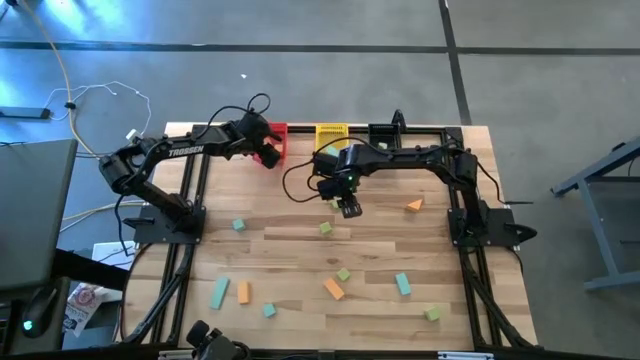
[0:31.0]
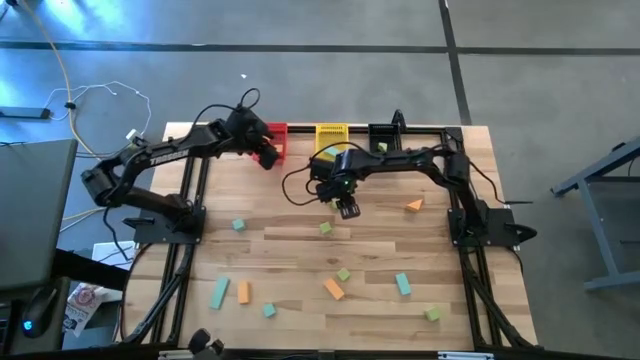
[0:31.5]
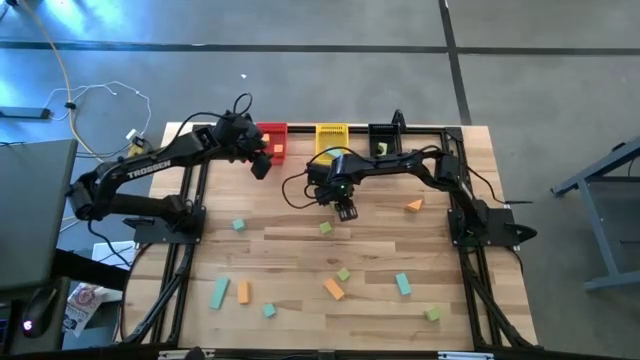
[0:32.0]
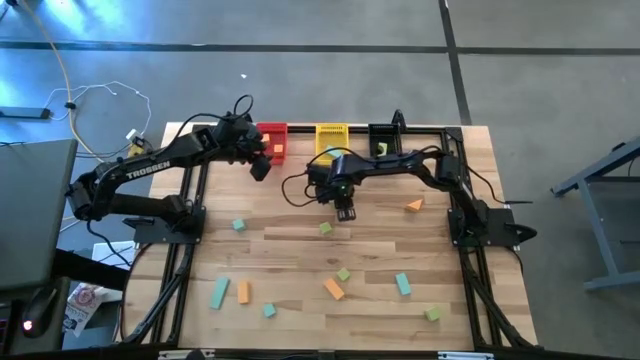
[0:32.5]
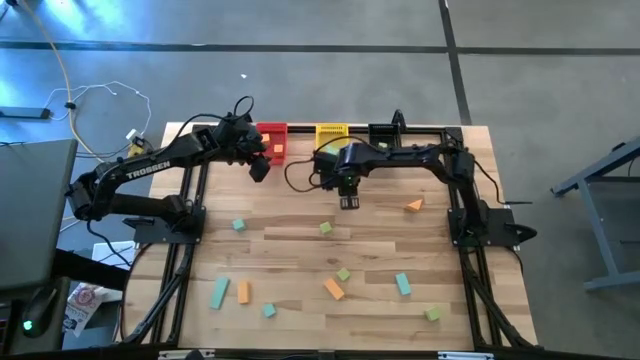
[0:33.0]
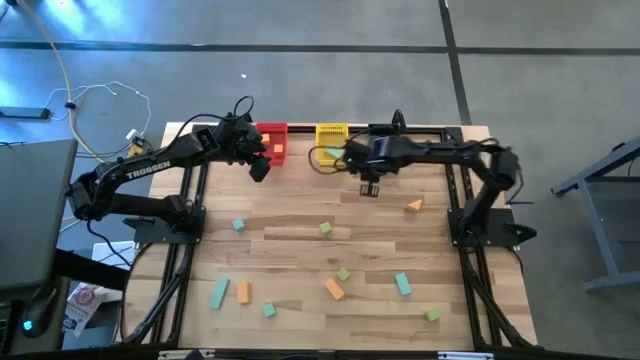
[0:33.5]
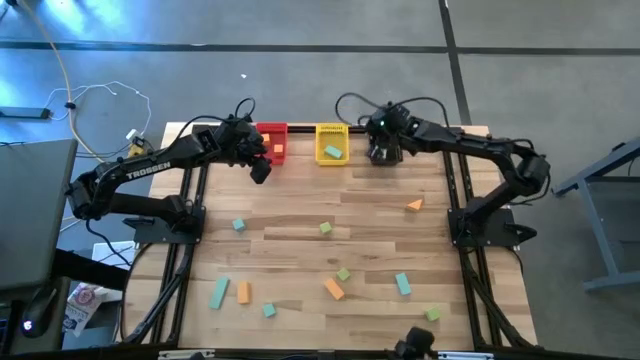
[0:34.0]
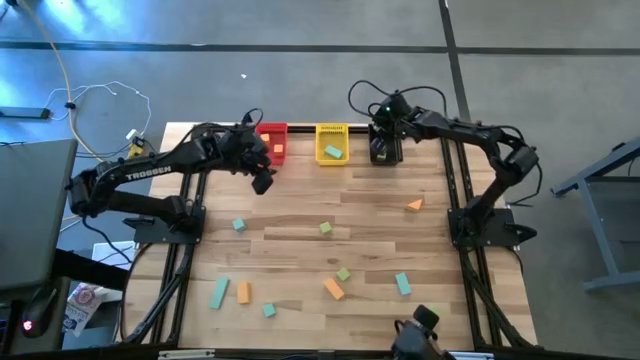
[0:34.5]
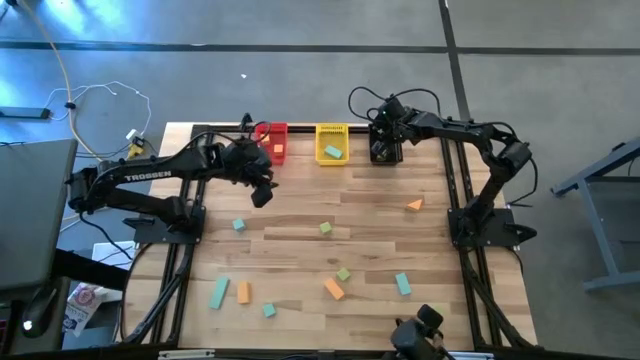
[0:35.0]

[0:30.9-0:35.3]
Task: Sort & place blocks by color
Put the green block into the black bin

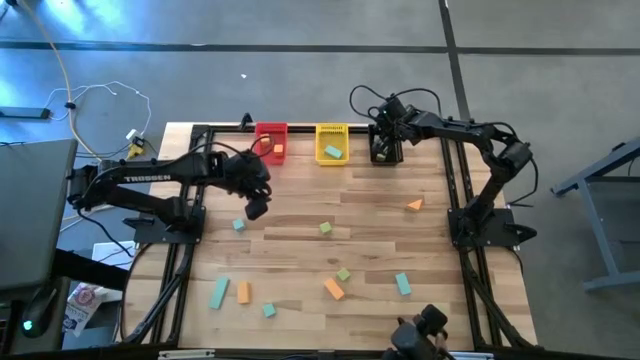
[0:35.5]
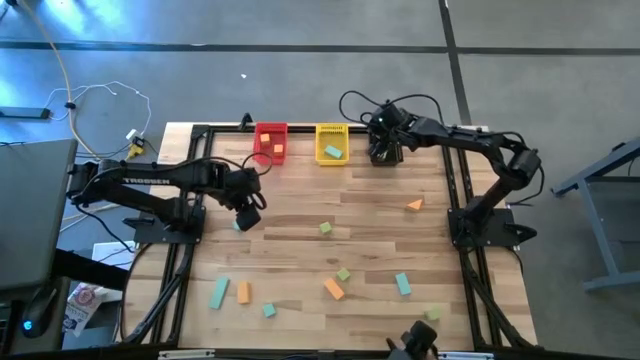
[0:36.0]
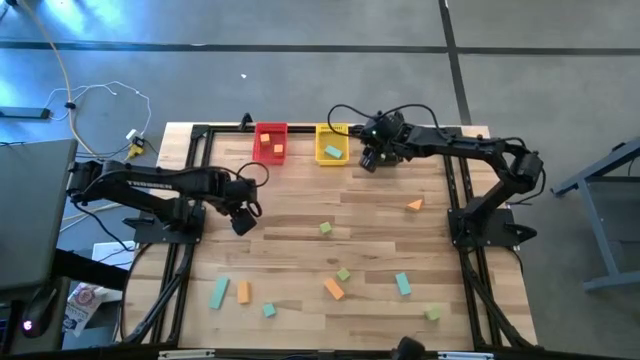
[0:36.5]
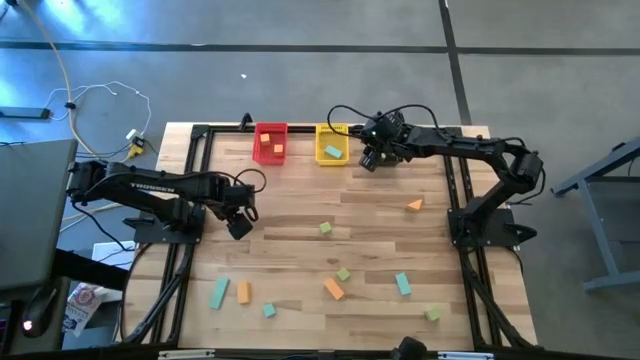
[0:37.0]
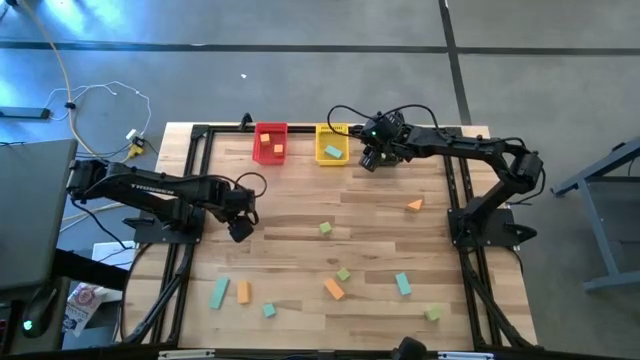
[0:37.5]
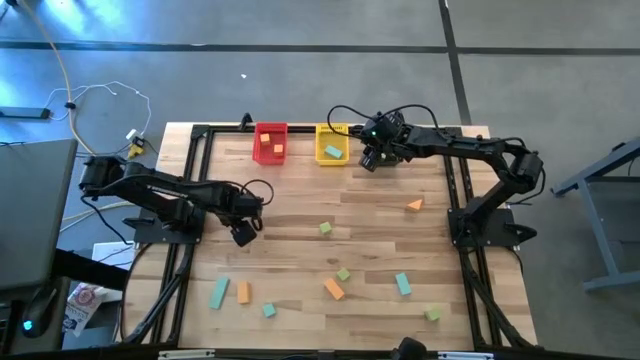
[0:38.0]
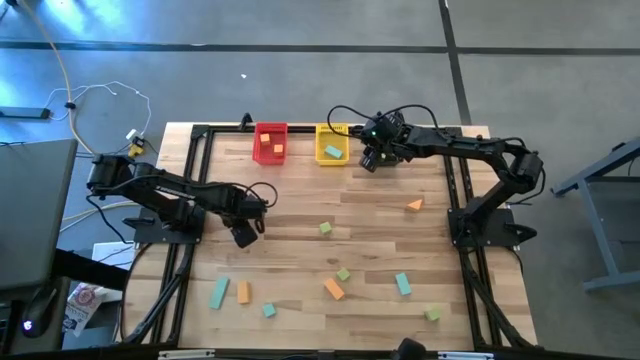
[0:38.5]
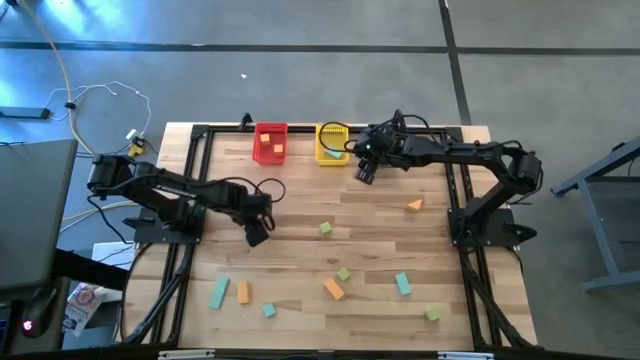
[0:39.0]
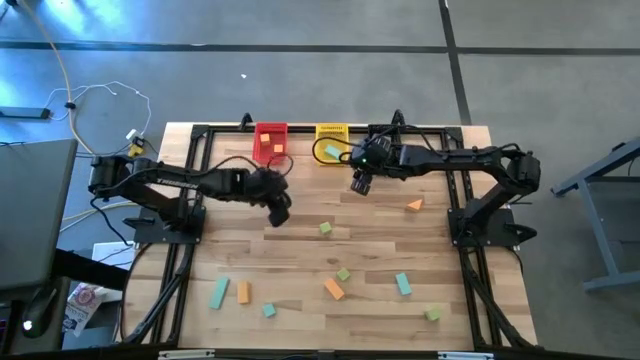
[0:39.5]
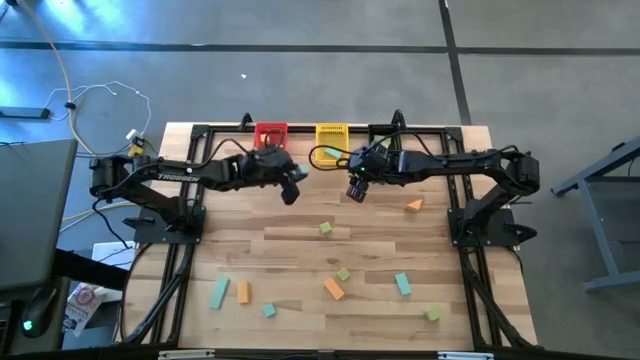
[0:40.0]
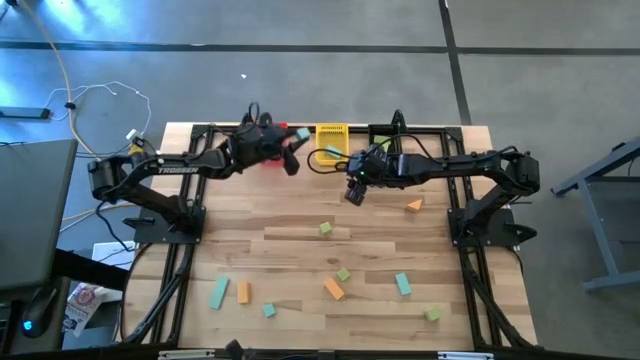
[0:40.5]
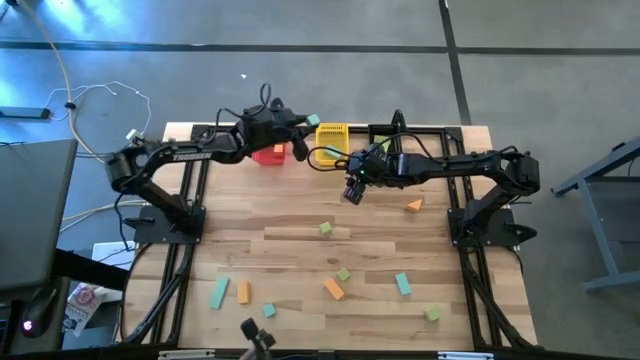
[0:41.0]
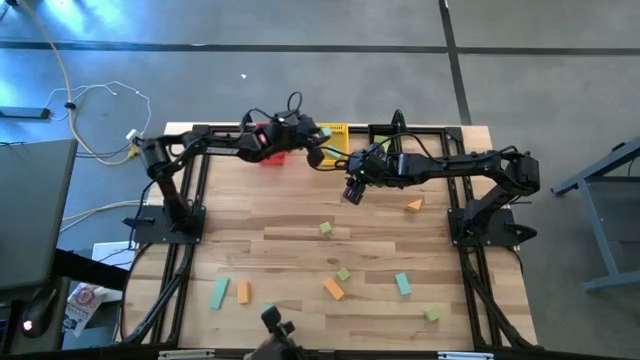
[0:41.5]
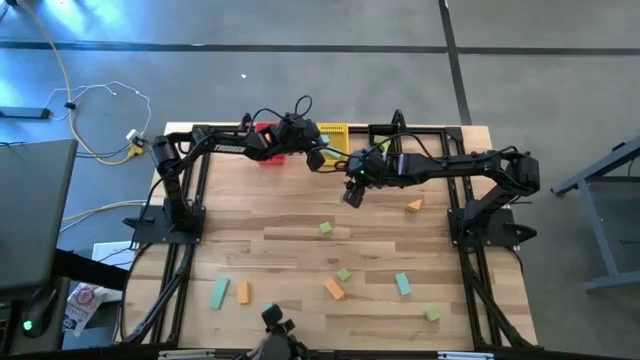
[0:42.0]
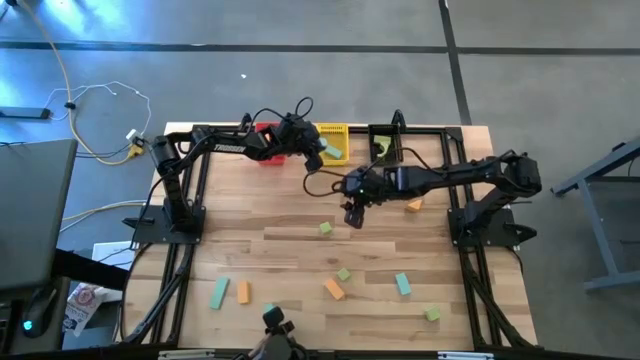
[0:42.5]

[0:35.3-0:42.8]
Put the blue block into the yellow bin

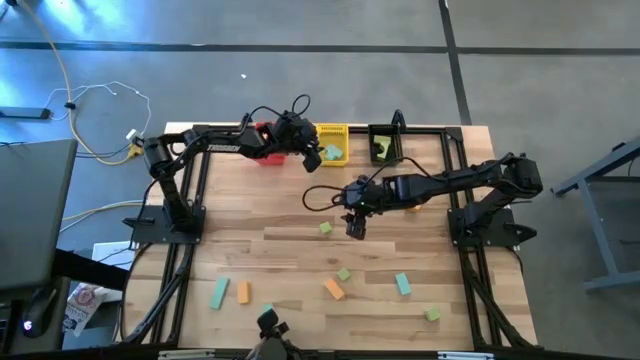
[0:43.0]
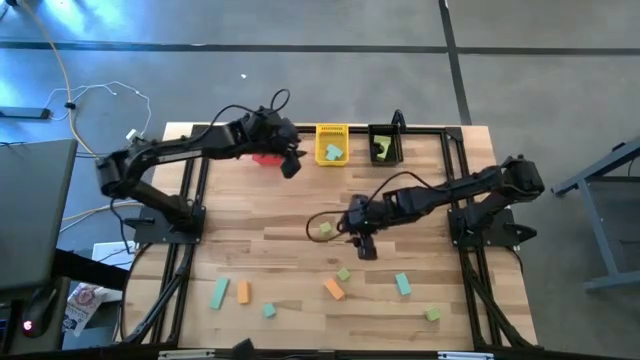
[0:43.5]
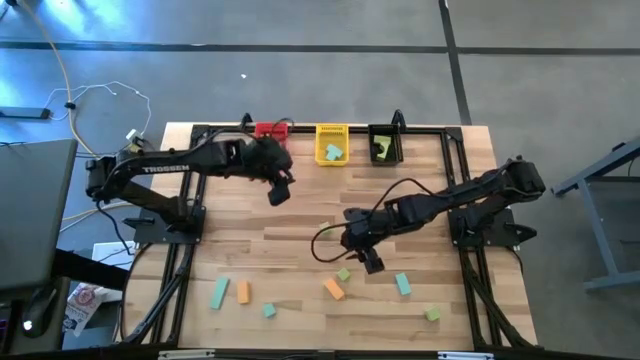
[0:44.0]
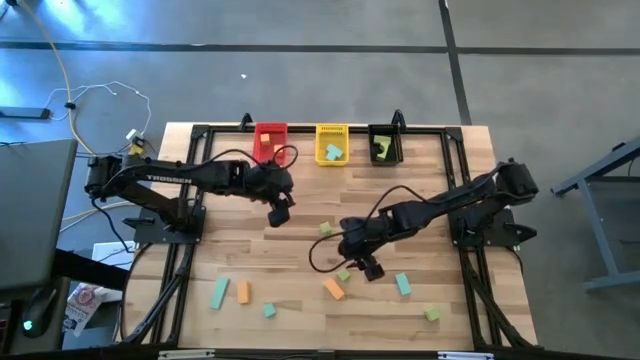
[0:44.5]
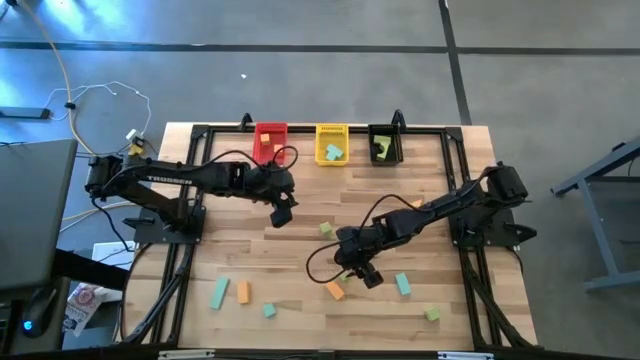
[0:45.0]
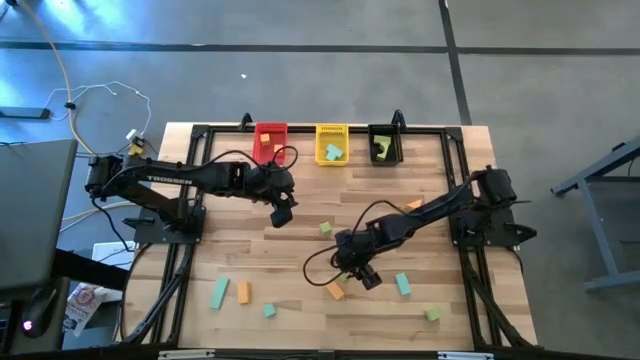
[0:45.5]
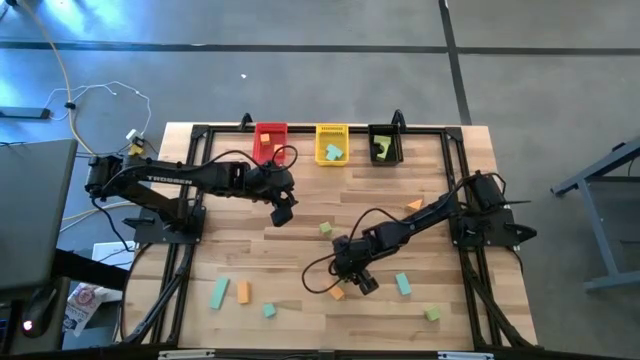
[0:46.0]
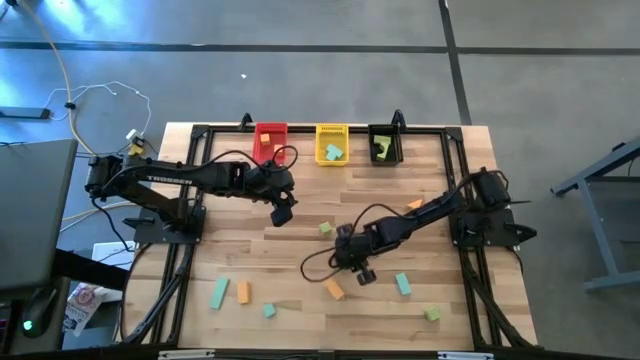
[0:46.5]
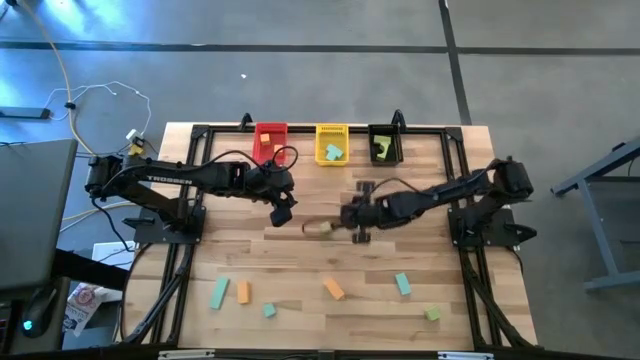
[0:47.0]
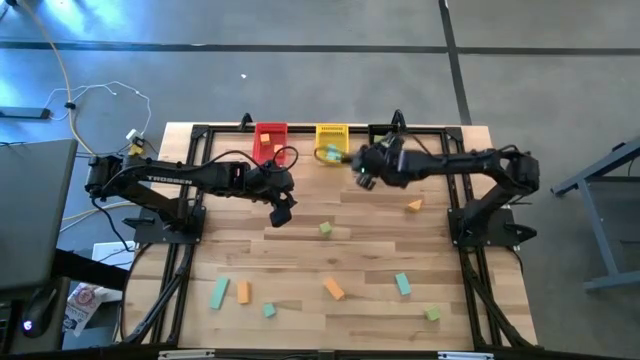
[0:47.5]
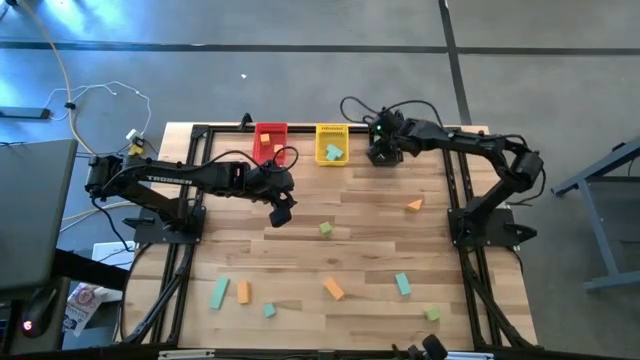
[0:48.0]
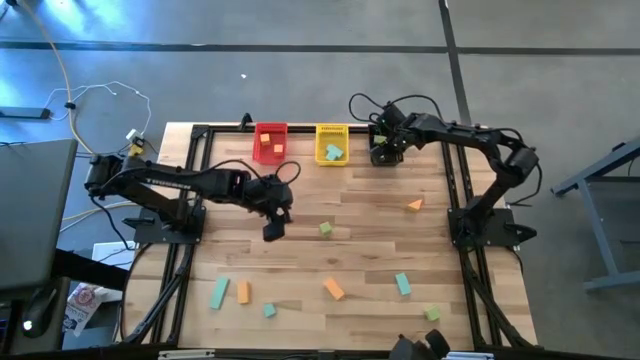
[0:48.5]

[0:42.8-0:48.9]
Put the green block into the black bin

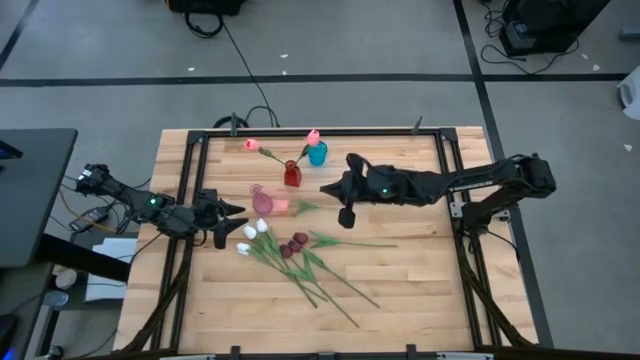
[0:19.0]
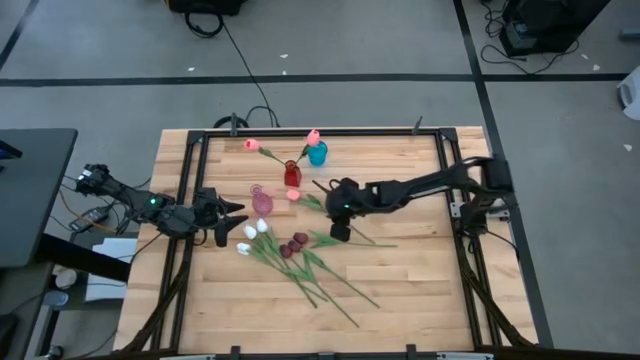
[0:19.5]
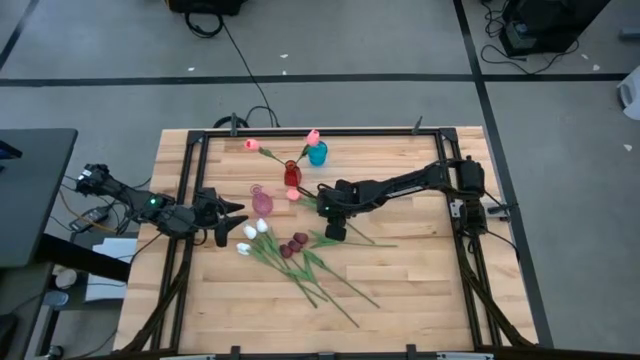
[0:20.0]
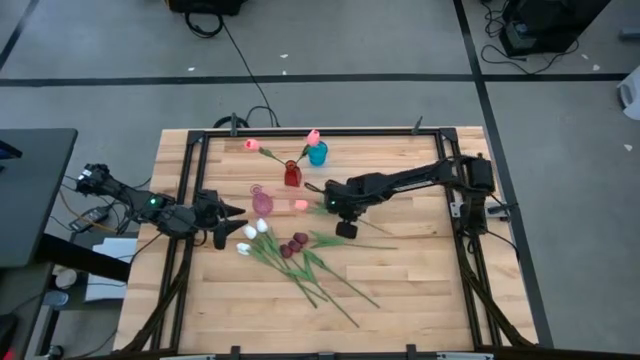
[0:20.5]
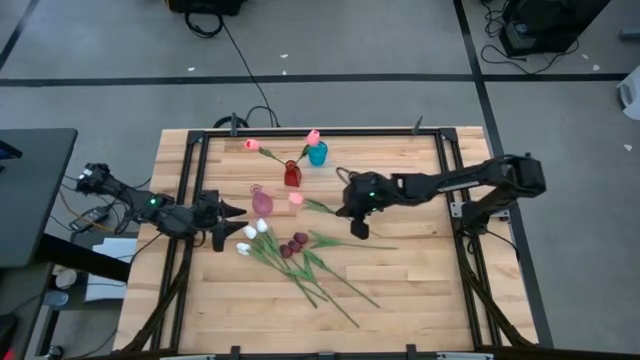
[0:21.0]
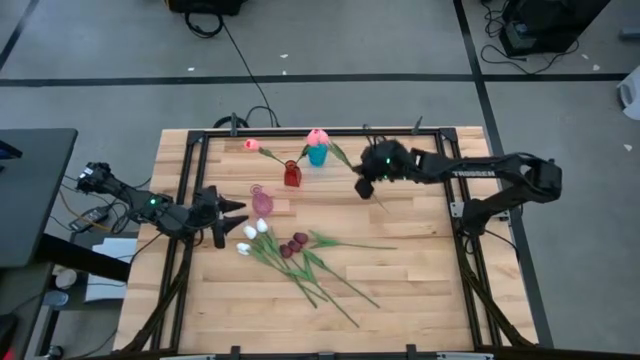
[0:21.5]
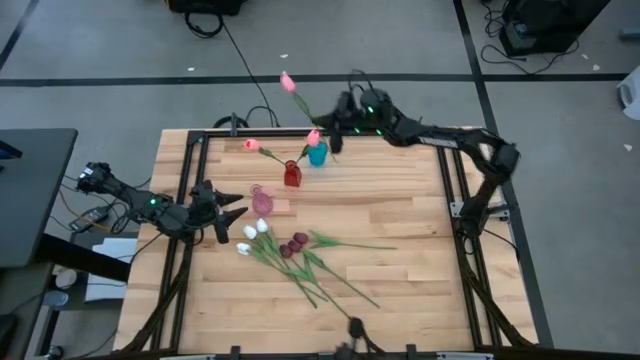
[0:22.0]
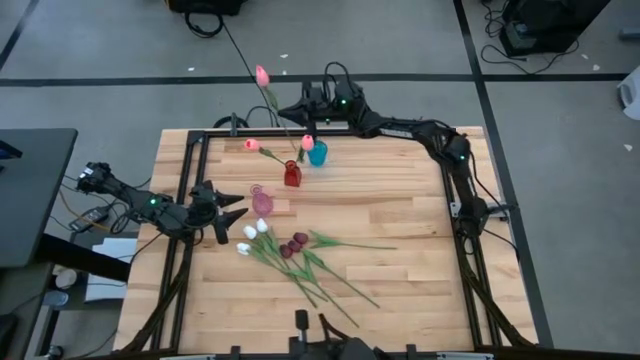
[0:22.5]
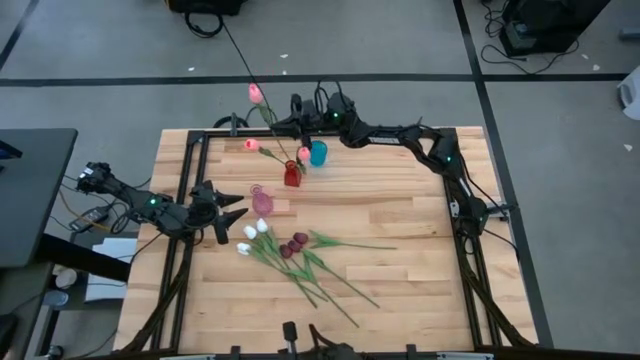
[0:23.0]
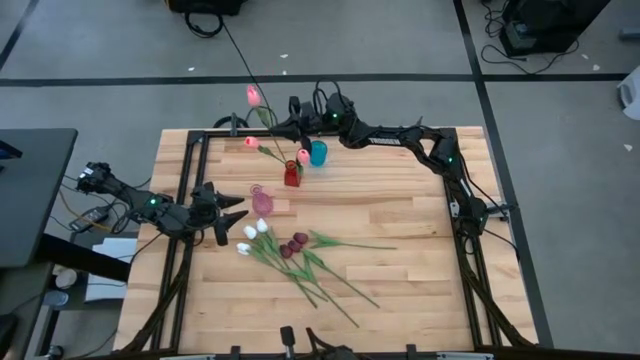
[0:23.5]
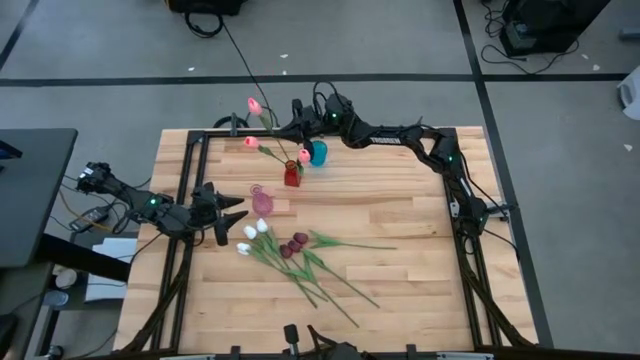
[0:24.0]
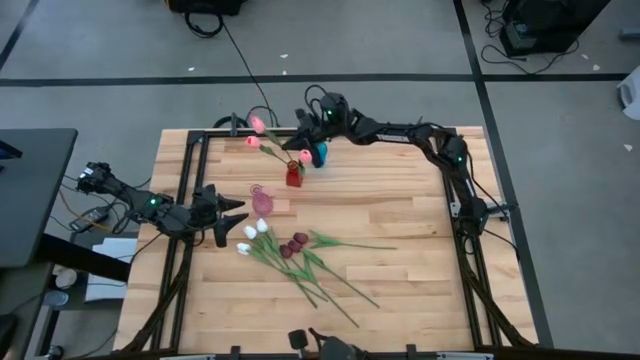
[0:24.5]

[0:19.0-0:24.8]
Task: Sort flowers into vase by color
Put the pink tulip into the red vase
